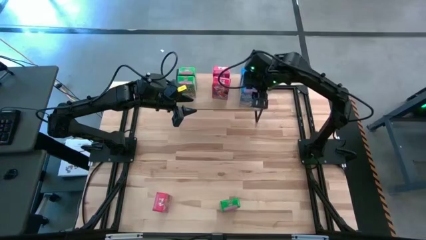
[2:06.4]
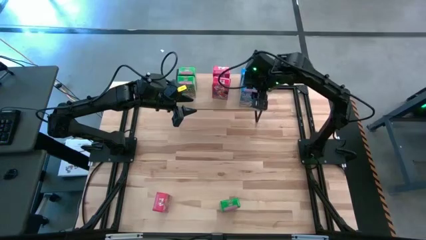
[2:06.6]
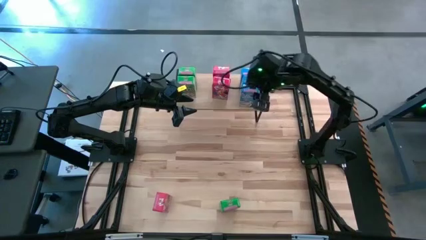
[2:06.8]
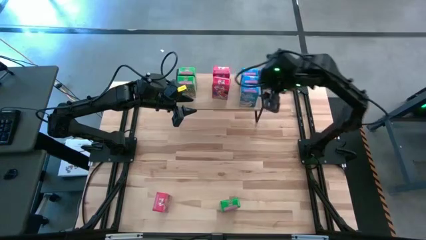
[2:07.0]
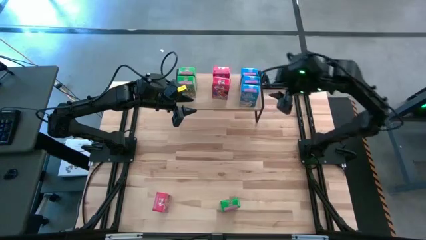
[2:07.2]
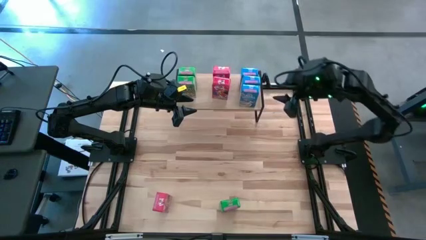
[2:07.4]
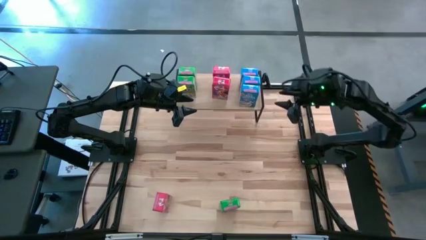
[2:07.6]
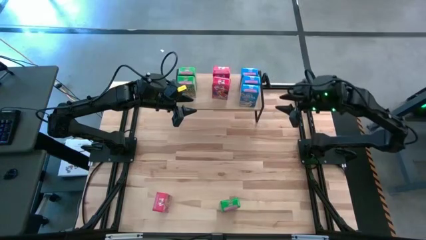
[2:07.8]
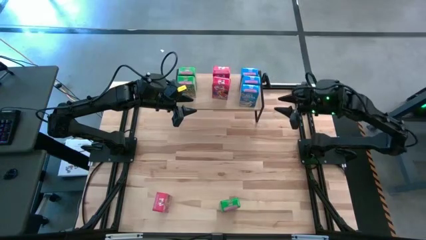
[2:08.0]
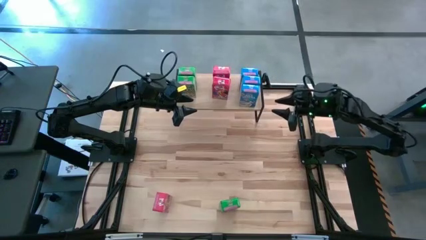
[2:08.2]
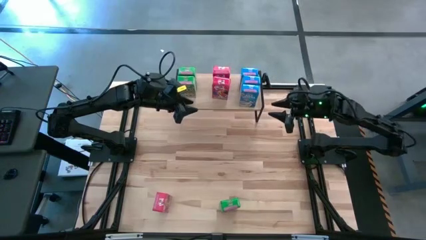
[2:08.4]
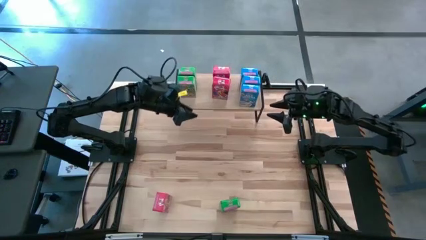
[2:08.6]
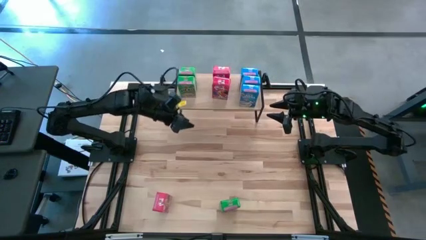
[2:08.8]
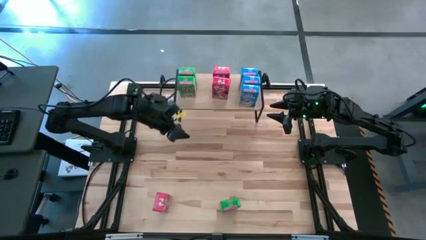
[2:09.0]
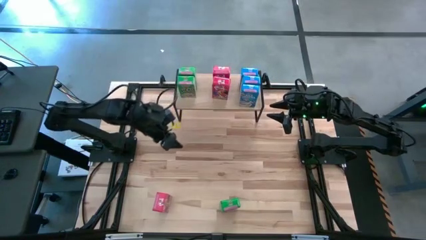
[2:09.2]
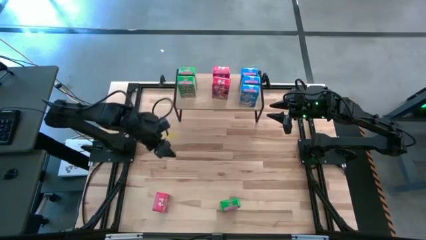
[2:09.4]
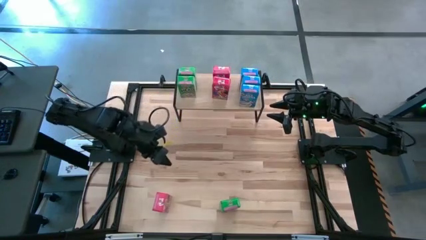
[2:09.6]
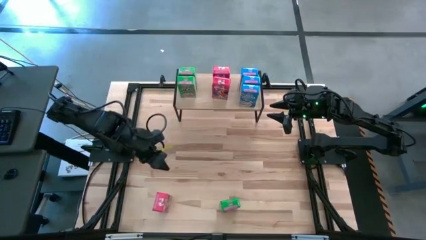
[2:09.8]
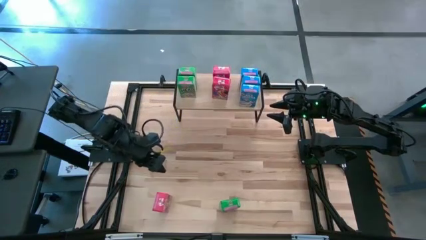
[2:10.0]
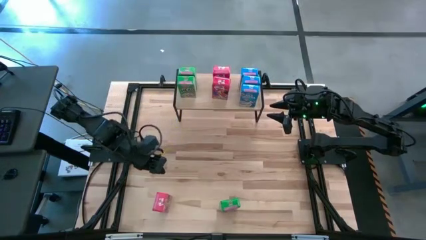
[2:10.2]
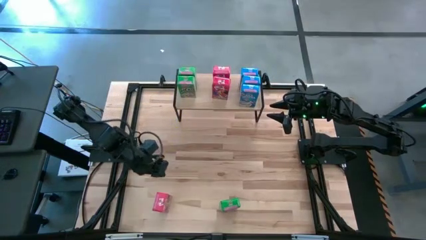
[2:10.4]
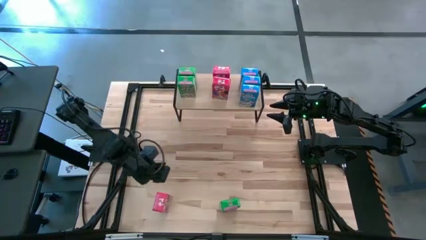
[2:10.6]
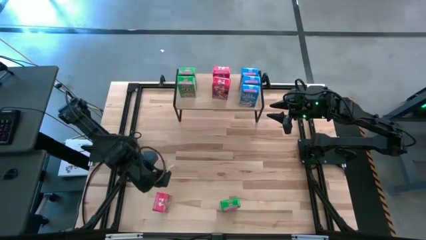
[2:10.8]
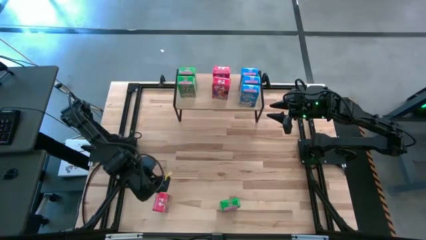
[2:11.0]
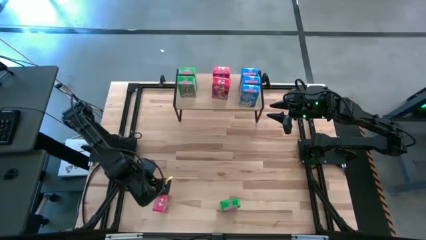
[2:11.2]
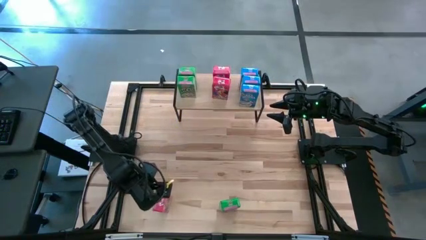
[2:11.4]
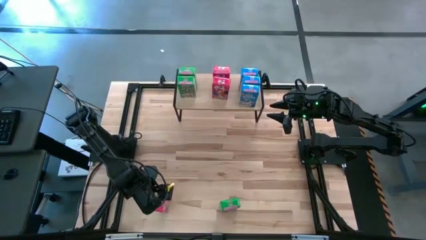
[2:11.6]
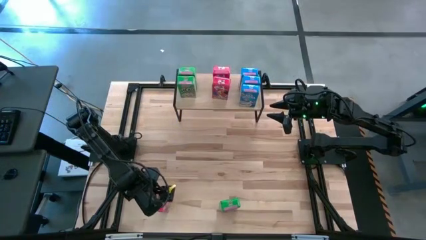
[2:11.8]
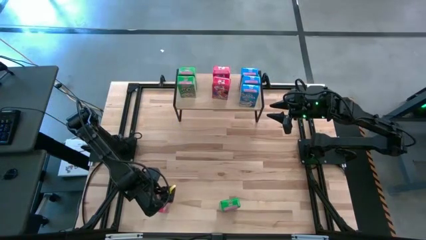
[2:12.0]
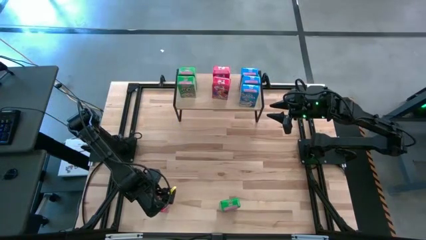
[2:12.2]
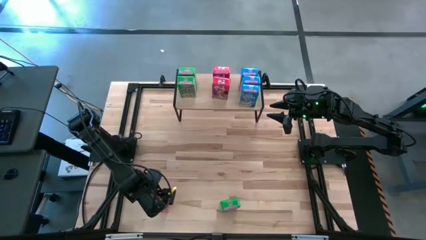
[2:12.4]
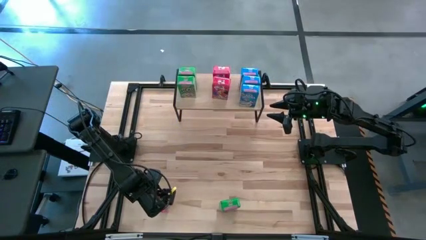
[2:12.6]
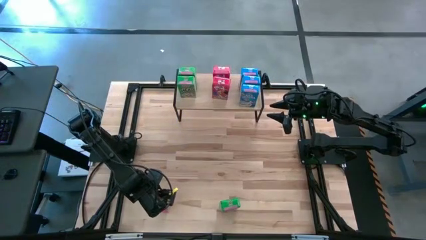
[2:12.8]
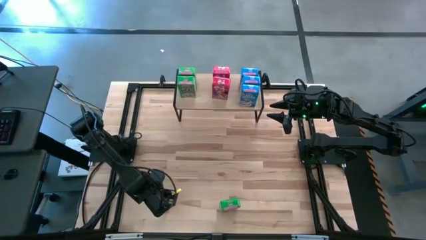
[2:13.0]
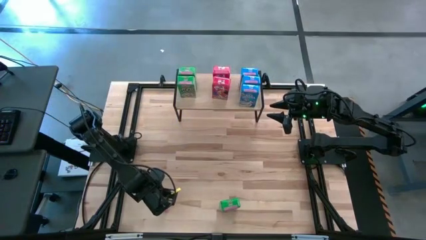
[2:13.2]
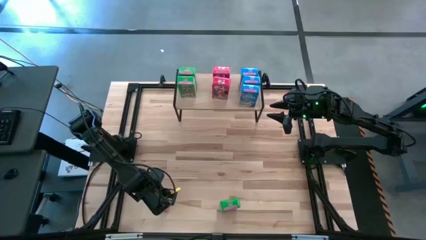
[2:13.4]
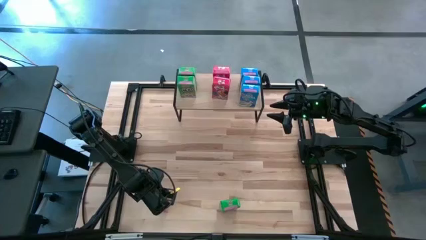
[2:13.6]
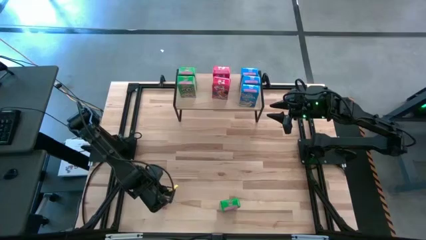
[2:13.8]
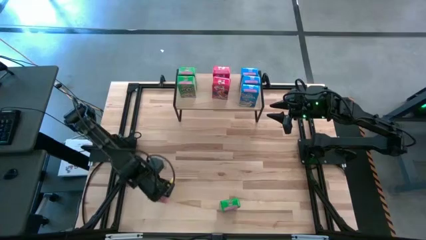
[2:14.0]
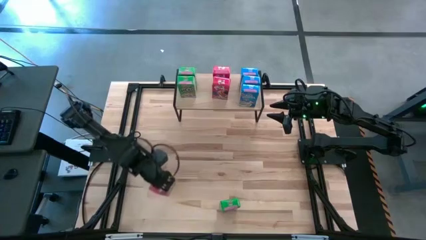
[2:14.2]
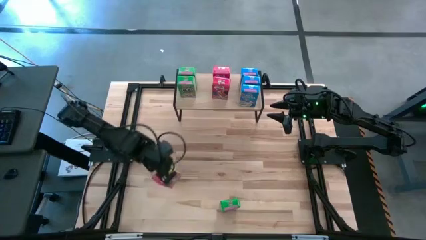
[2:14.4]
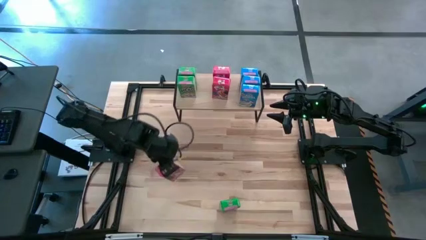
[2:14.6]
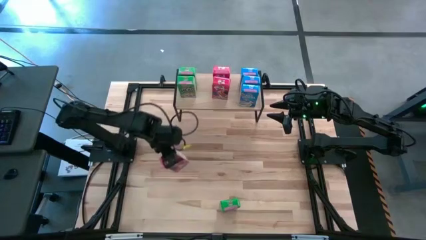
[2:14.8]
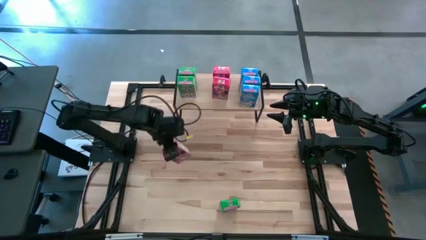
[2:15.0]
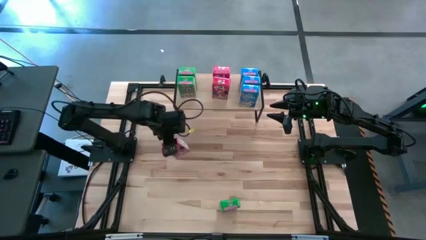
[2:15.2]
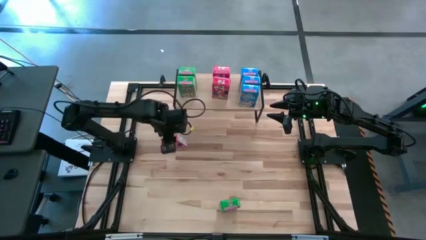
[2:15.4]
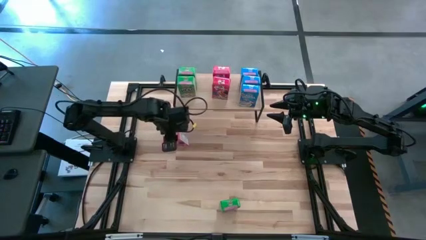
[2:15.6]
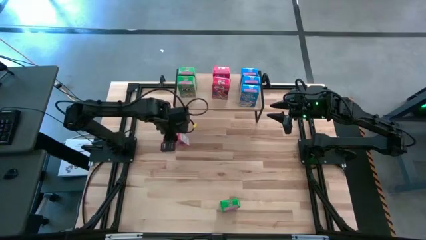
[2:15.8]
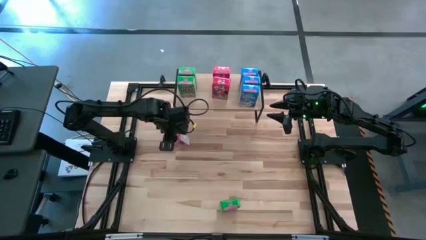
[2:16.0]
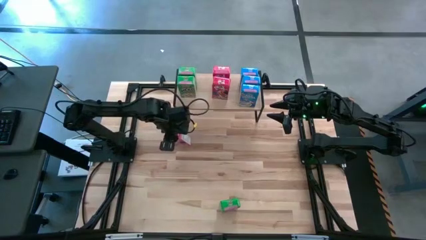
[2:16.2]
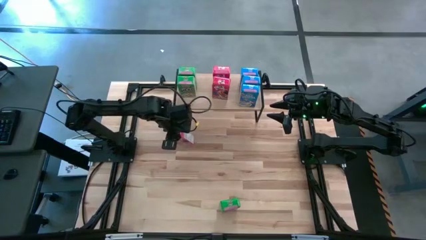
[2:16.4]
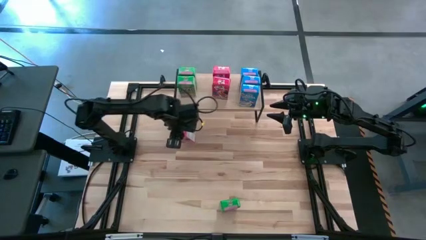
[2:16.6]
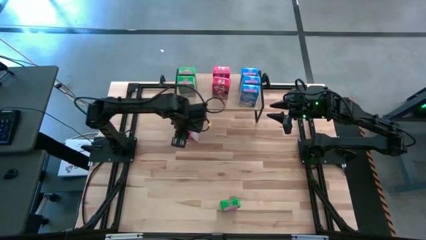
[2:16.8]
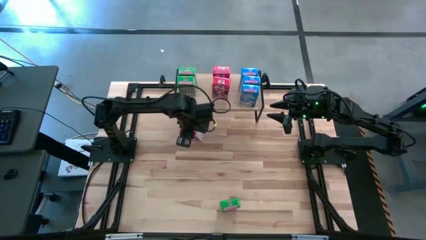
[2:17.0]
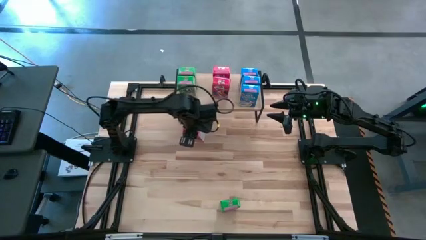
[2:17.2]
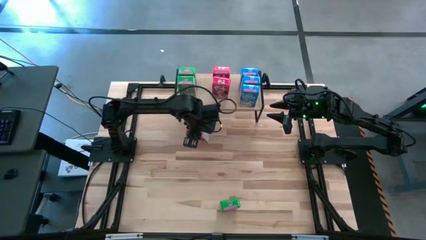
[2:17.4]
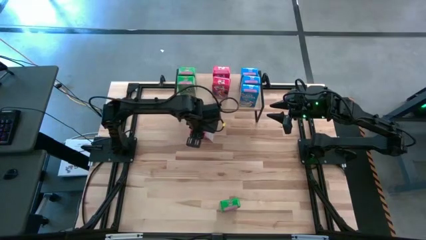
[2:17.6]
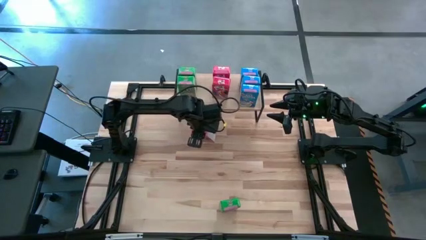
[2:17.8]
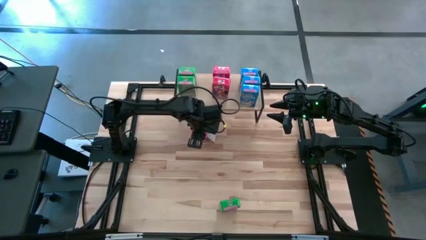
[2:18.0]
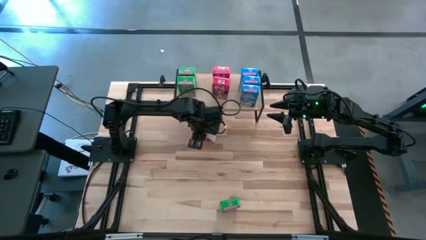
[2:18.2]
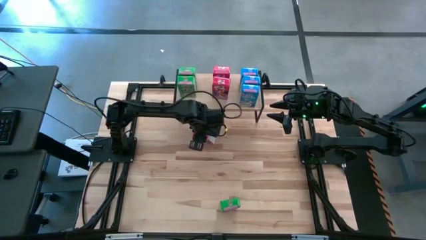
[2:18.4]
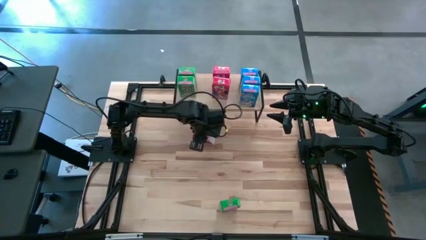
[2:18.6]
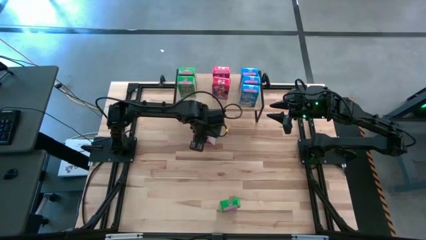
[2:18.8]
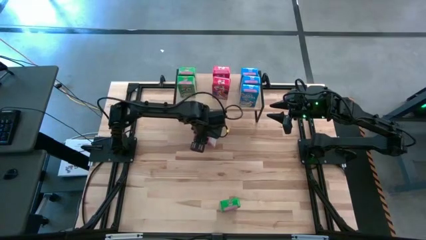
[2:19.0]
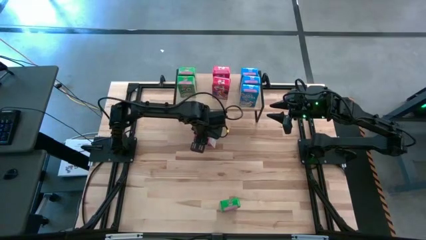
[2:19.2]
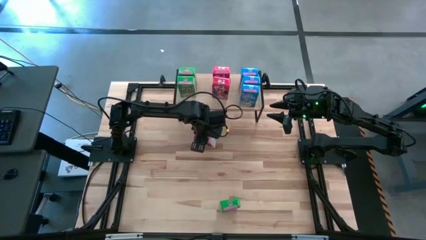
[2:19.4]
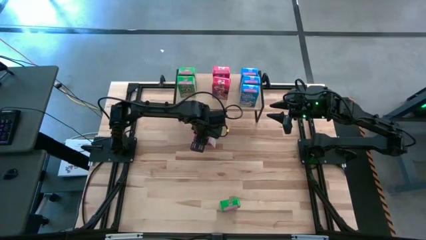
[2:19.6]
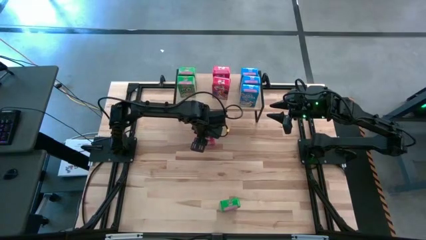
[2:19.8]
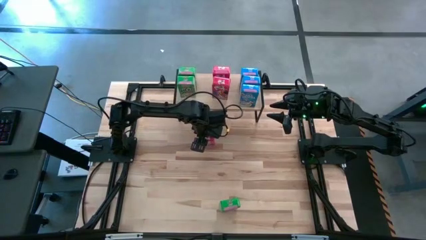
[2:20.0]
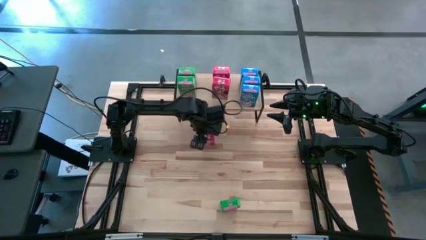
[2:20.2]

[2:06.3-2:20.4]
Task: Stack cereal on shelf
Put the red cereal box on the shelf aligned with the other red cereal boxes

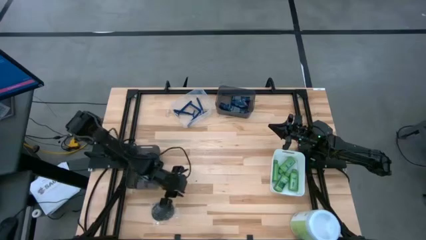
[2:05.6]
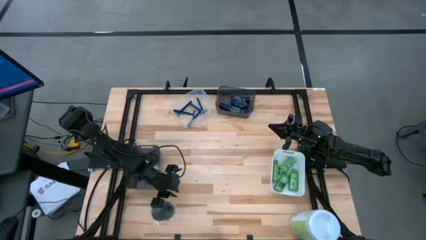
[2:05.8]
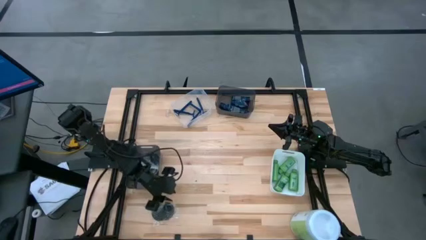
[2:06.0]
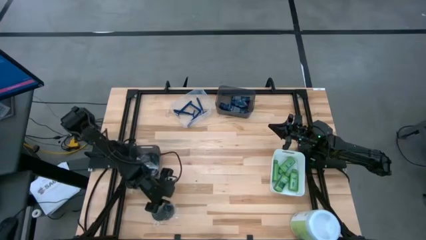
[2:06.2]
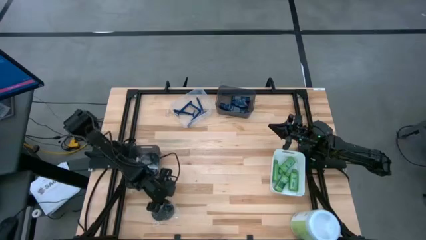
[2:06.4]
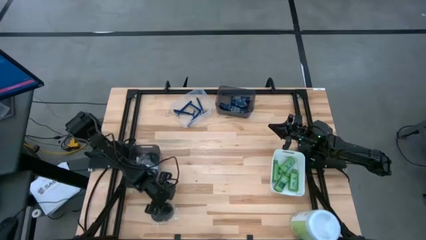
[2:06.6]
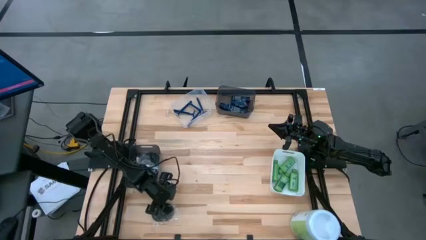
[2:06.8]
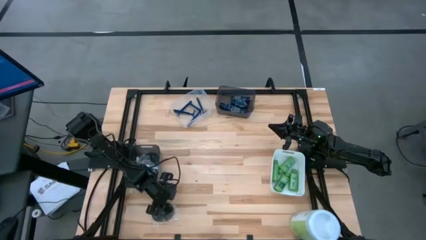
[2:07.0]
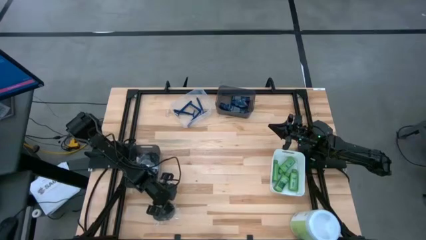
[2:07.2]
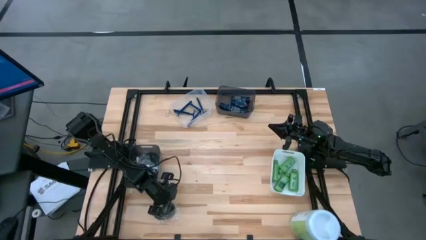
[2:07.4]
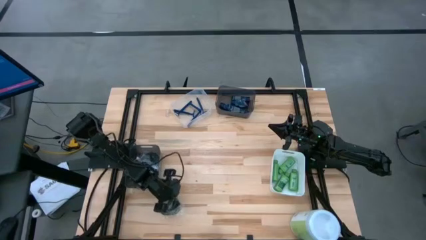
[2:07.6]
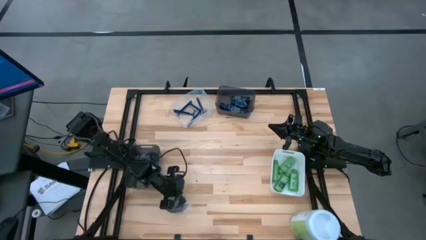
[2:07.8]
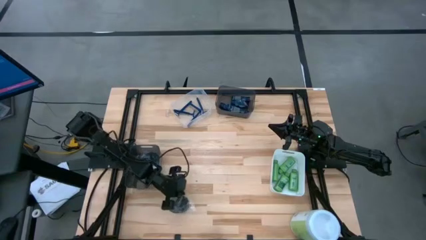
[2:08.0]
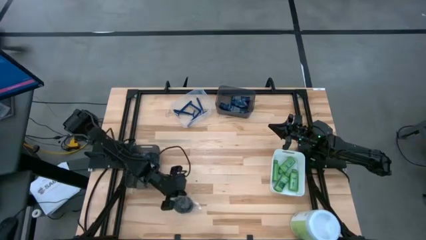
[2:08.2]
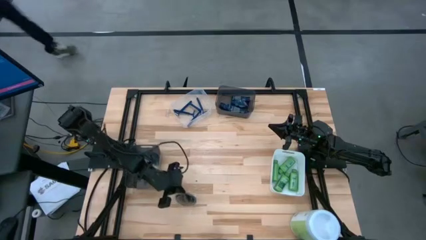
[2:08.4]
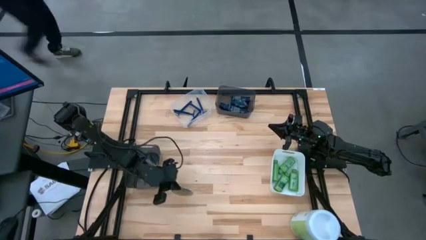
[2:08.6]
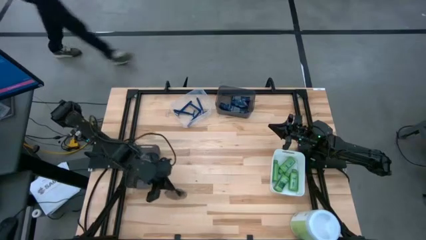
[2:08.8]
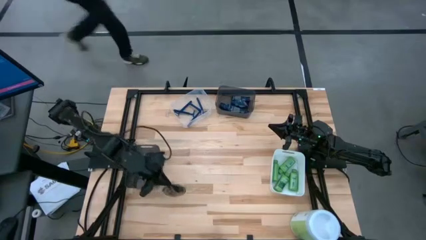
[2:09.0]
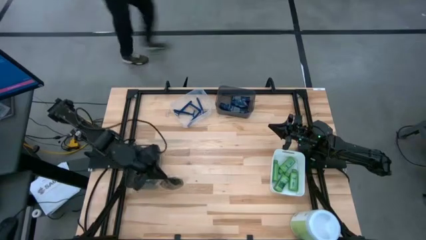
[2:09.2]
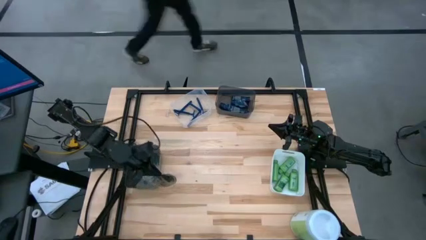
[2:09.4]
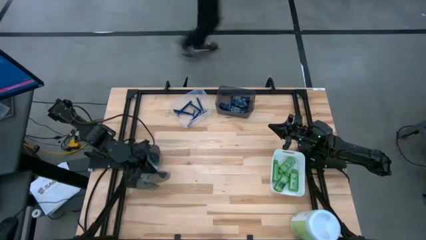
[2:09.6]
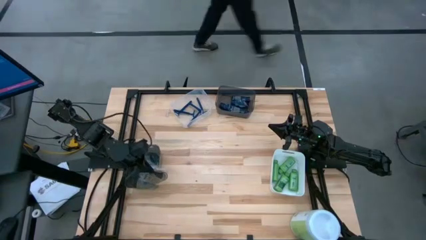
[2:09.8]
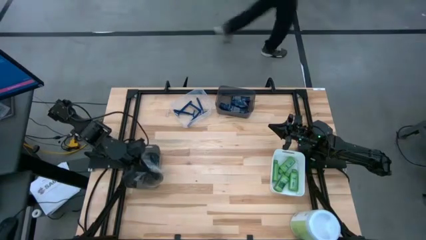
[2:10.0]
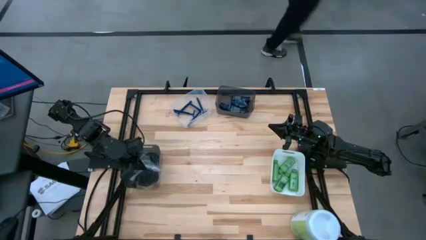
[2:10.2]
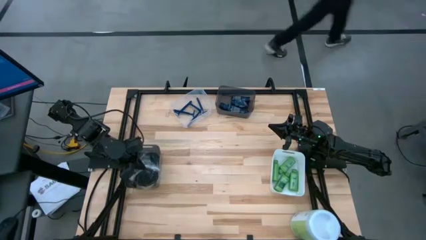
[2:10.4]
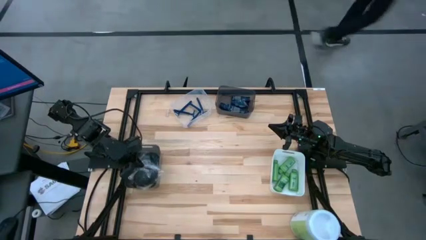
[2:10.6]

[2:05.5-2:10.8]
Task: Pick & Place Travel size toiletries
Put the black hairbrush into the bottom black bin
